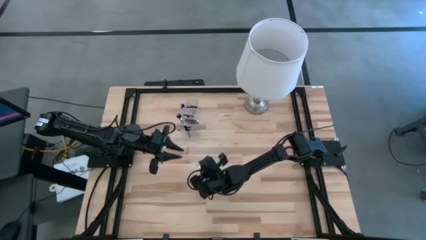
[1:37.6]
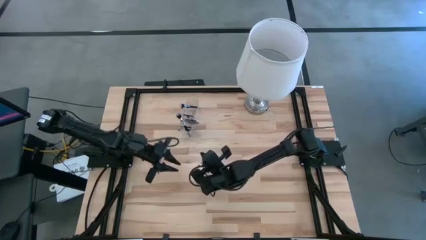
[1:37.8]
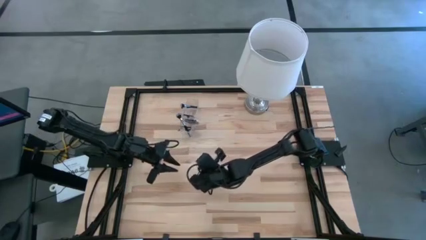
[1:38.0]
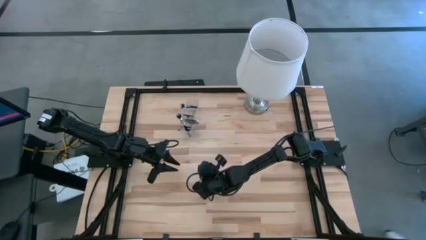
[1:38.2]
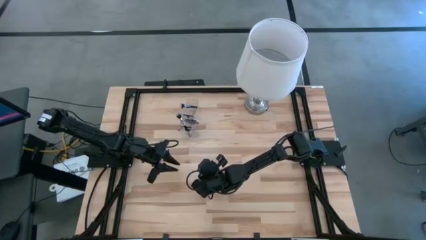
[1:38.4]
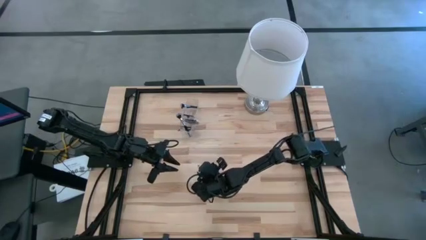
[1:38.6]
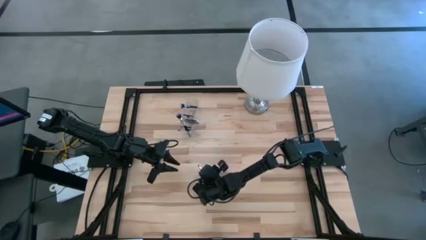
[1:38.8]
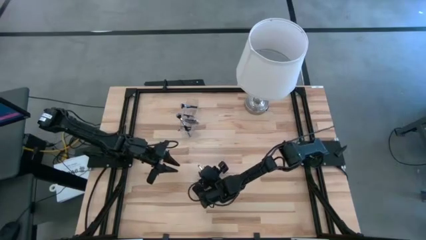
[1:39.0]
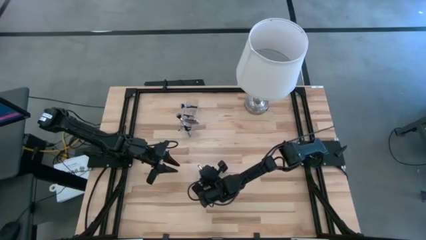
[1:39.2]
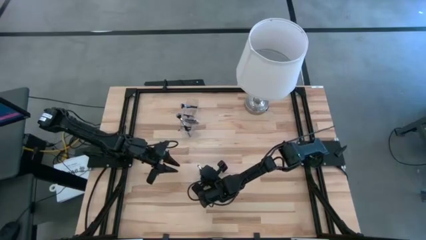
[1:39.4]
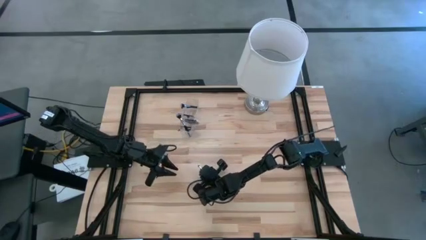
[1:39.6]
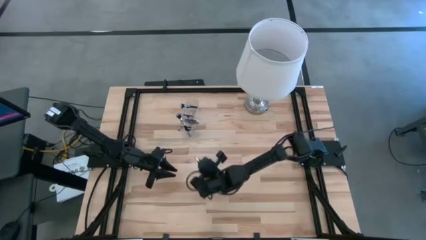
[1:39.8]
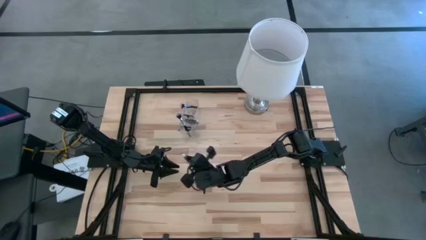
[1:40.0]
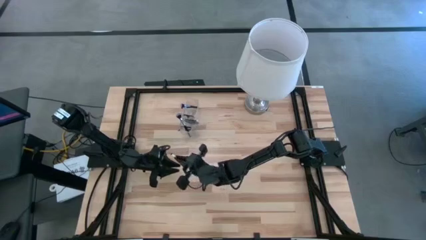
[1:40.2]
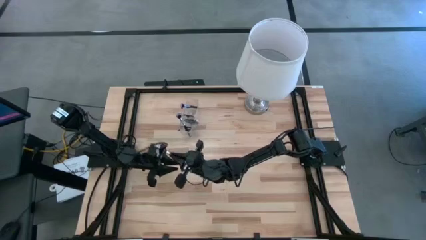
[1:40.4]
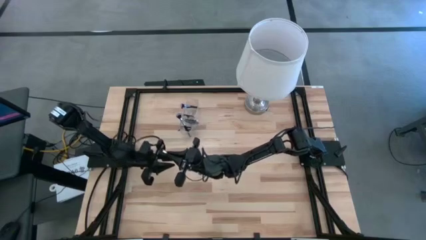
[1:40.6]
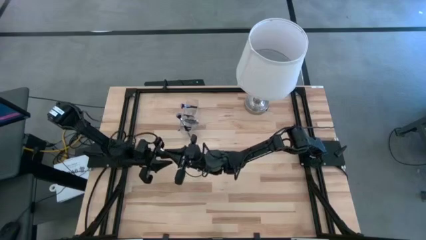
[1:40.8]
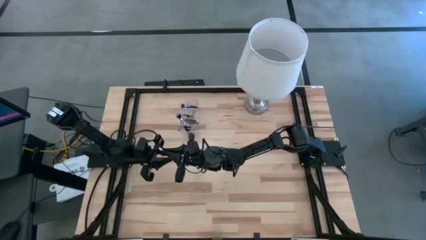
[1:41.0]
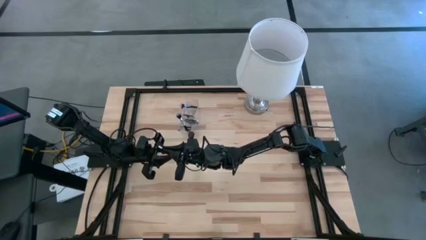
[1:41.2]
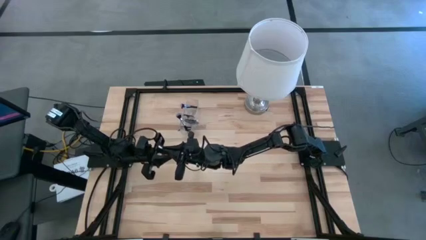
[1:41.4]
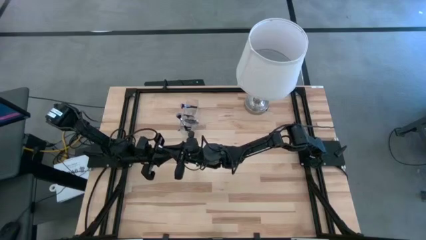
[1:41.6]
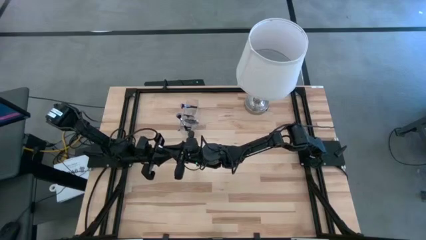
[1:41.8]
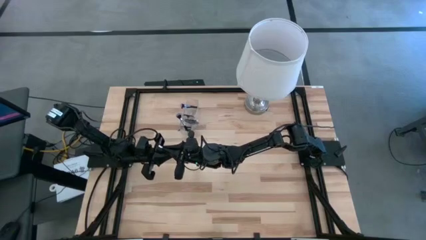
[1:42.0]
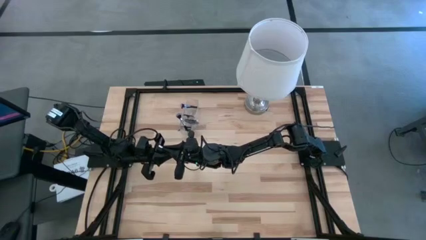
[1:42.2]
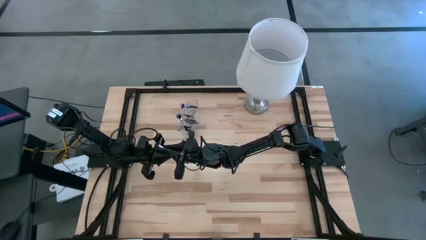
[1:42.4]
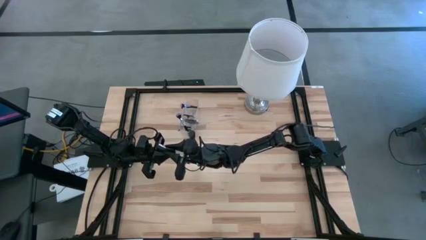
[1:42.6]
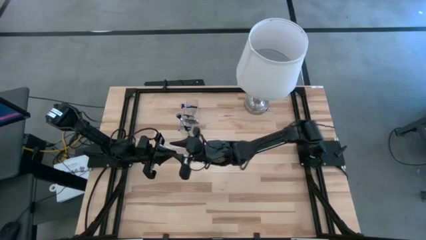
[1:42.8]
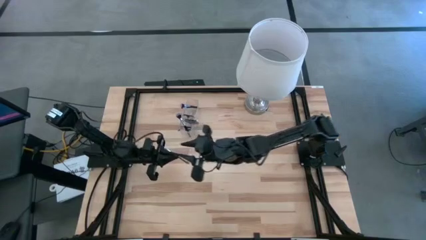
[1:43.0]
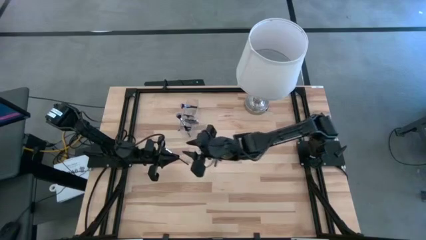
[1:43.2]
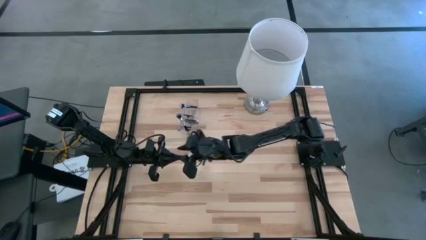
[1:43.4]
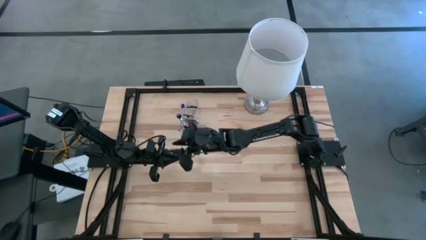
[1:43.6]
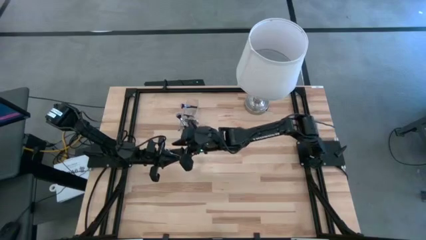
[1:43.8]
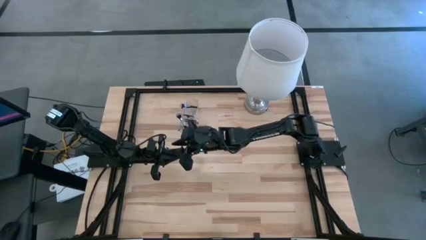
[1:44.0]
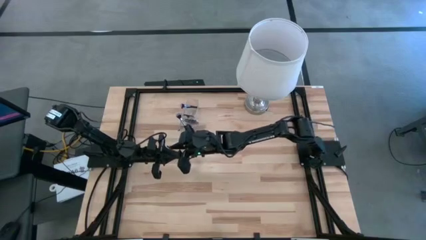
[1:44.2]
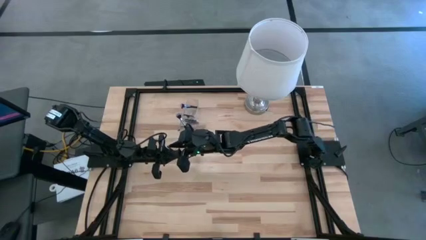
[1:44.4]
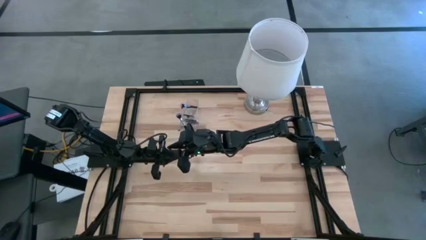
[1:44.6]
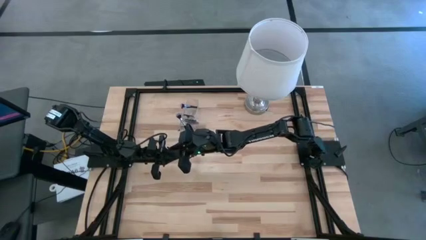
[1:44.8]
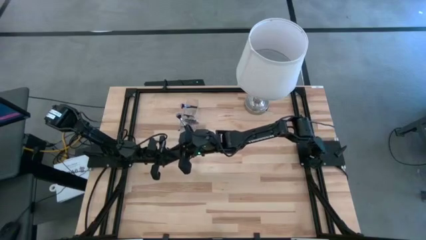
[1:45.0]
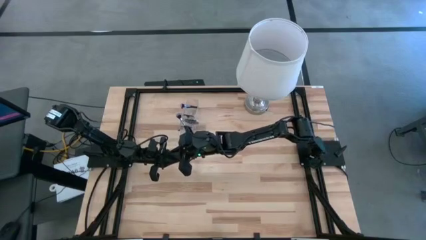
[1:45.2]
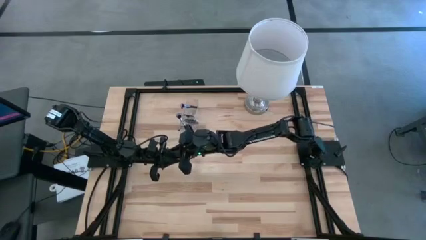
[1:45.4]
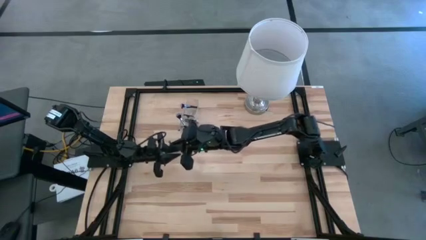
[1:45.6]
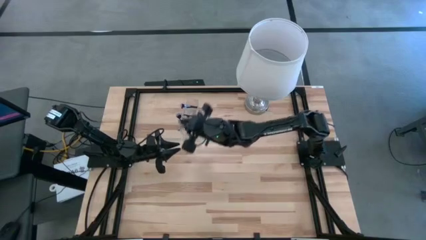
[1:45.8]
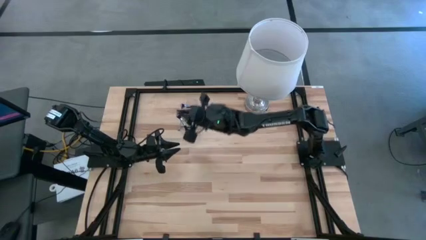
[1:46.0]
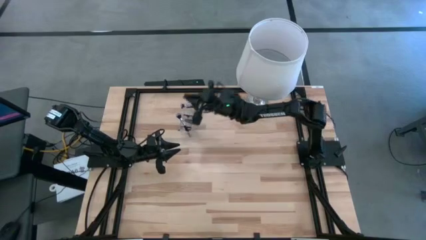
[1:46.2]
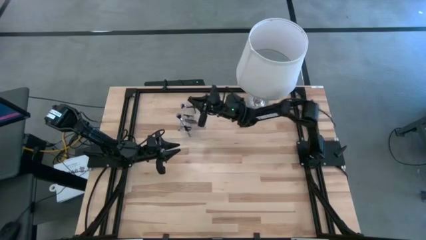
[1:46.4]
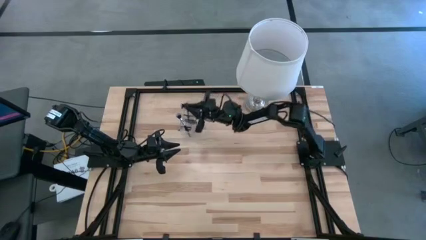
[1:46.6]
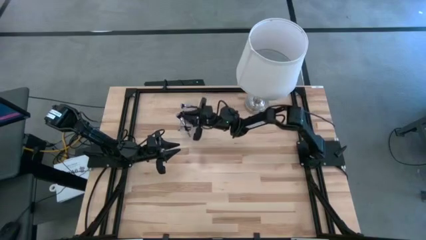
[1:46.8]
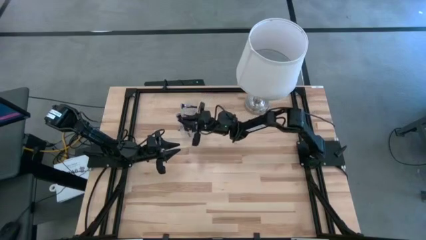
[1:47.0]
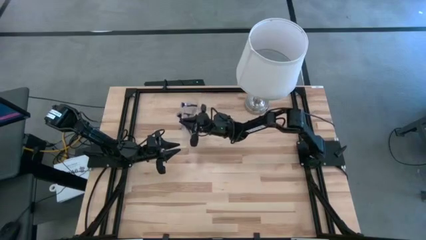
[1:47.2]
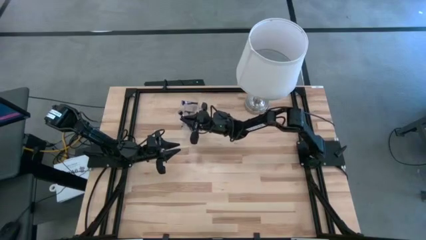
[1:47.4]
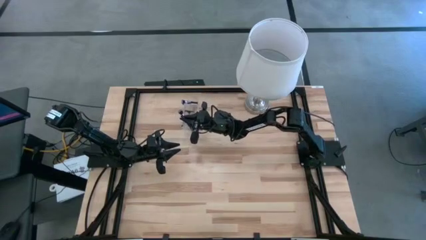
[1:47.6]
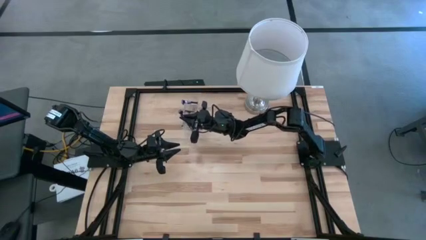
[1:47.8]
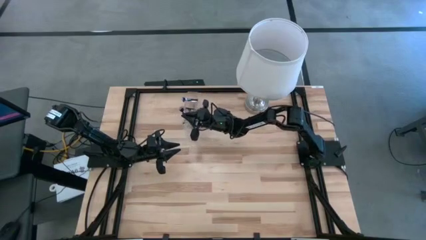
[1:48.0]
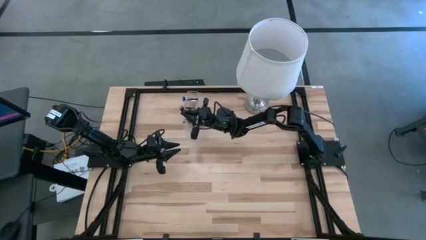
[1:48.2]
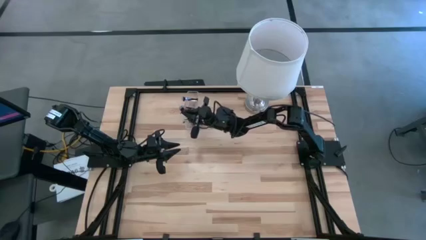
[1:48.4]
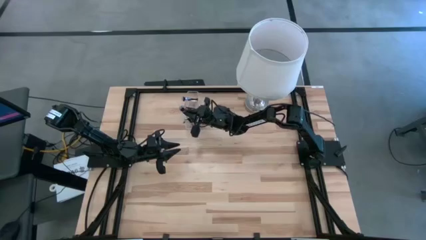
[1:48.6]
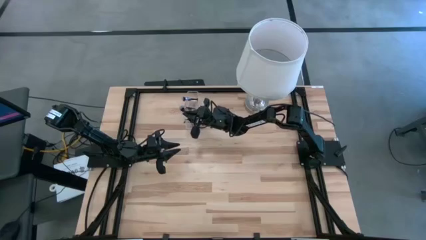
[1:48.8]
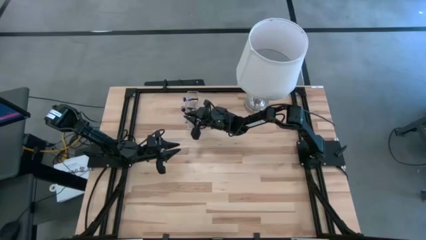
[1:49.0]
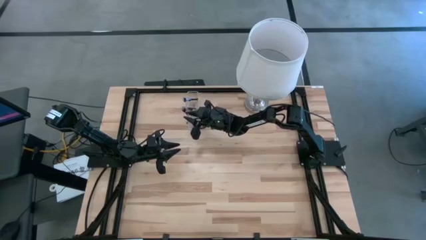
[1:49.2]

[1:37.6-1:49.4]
Task: Put items in baskets/containers
Put the eyeshadow brush into the right transparent organizer

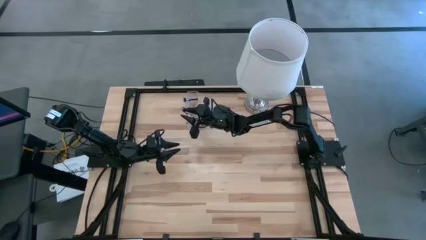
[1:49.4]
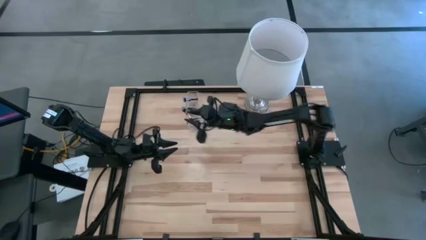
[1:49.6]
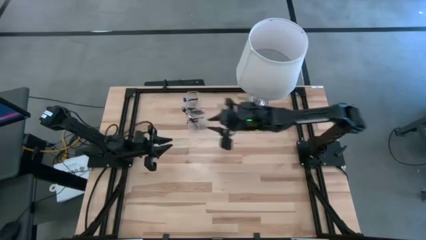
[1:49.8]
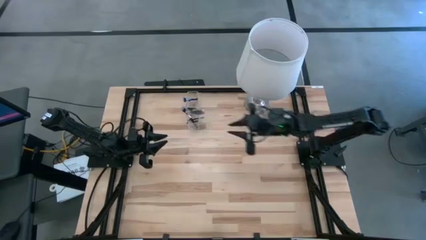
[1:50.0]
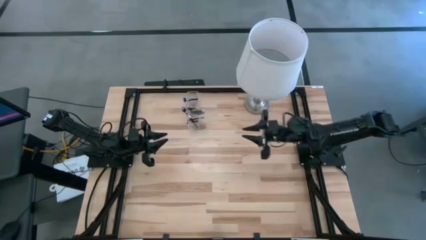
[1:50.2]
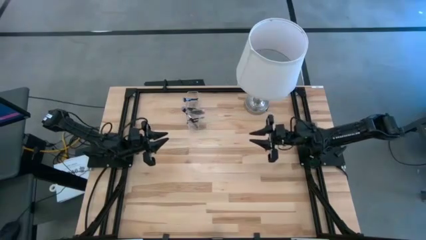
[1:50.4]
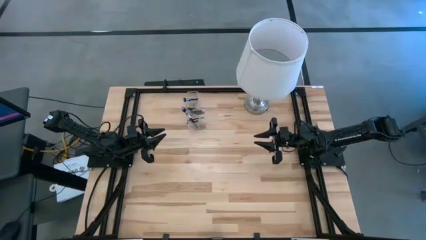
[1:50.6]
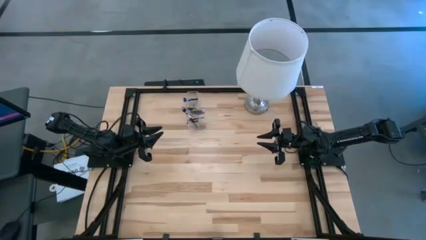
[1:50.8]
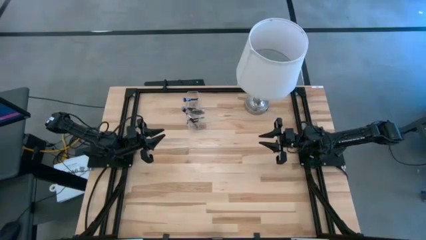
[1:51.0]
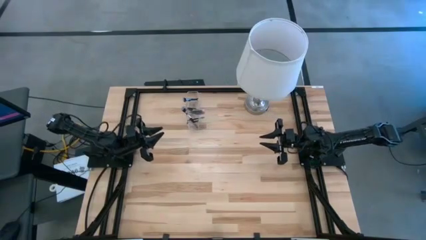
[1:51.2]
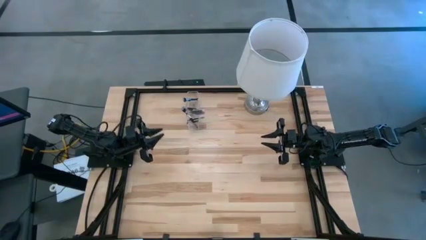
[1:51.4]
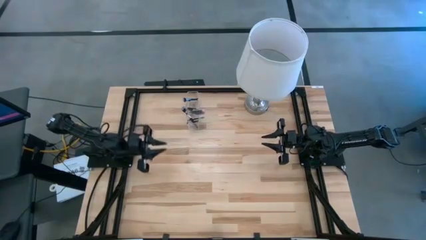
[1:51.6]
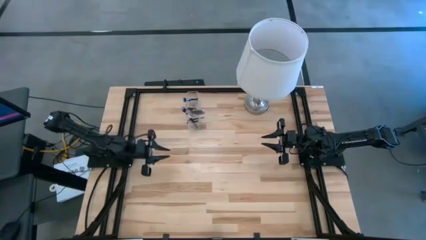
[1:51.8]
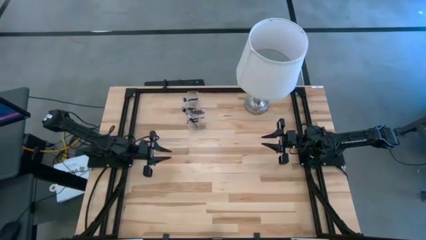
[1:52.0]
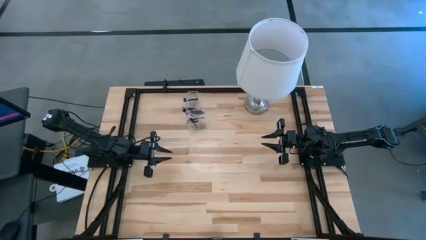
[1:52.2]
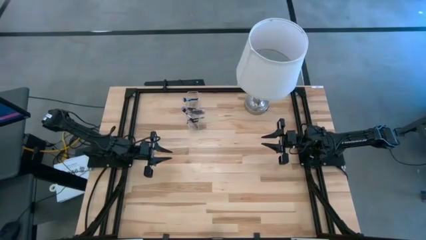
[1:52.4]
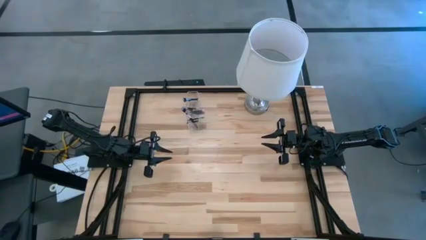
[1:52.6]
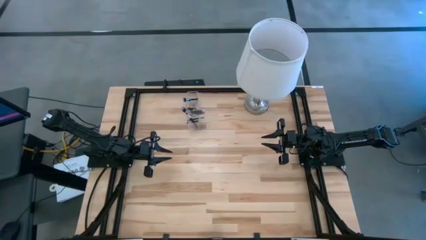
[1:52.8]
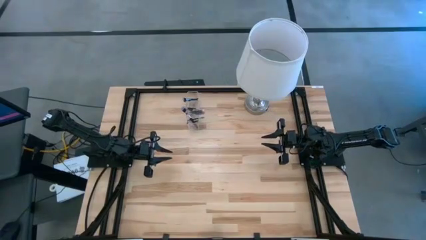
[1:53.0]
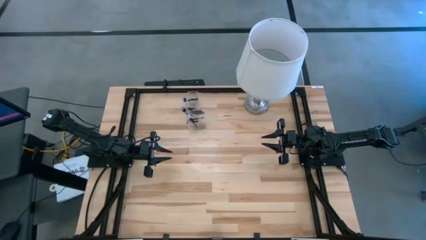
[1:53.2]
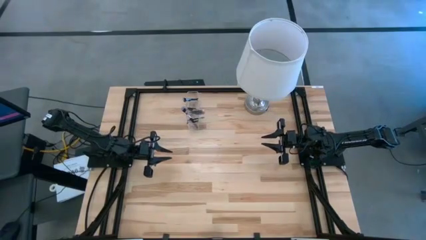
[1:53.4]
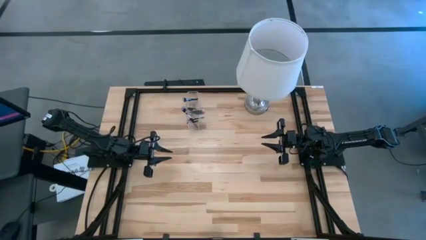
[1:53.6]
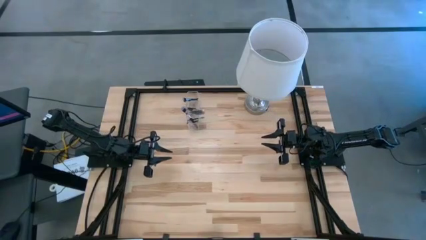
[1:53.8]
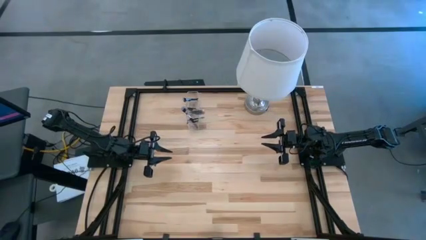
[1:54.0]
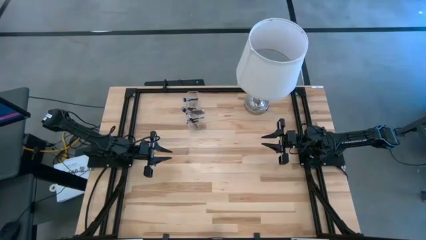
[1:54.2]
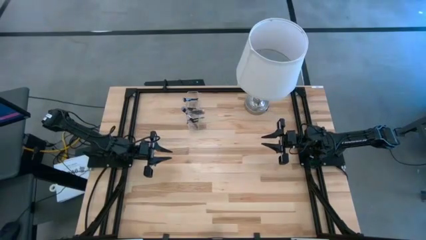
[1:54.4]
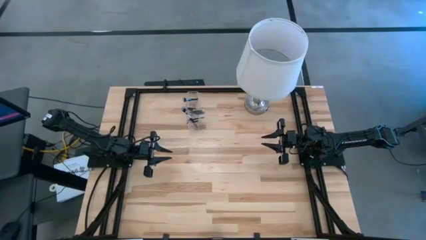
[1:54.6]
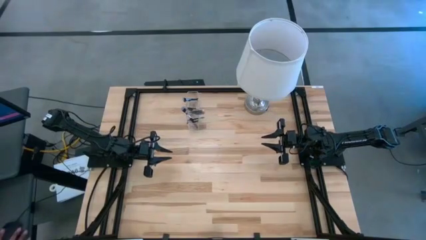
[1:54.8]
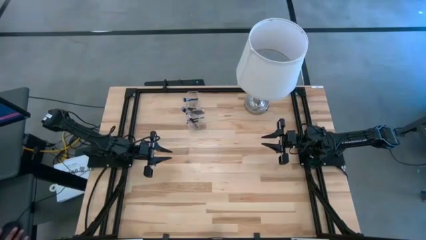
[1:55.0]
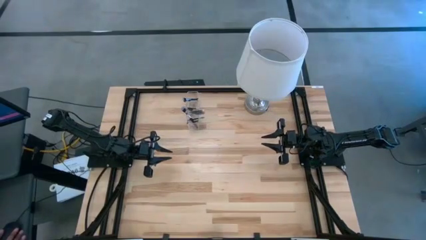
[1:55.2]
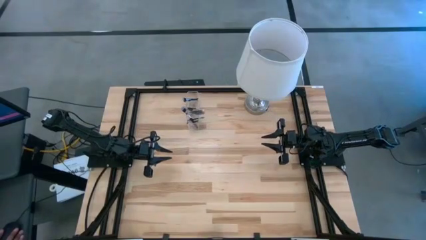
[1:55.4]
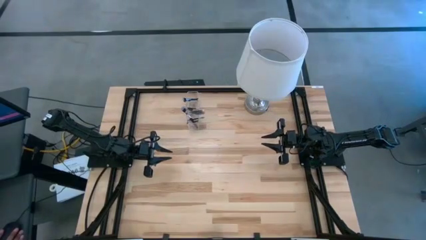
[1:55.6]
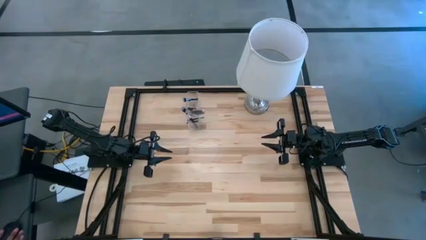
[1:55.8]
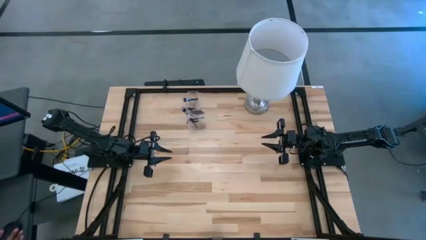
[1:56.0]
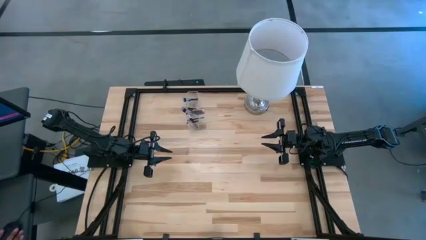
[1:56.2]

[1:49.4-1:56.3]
Return to home position
